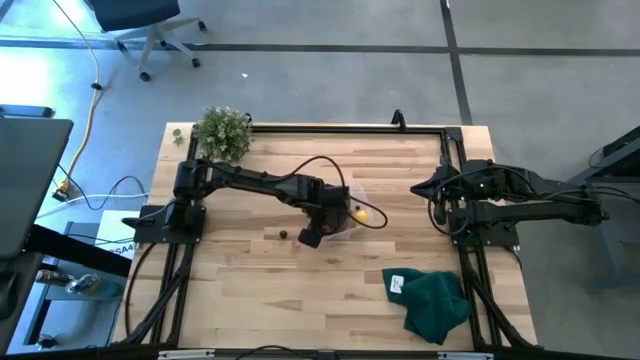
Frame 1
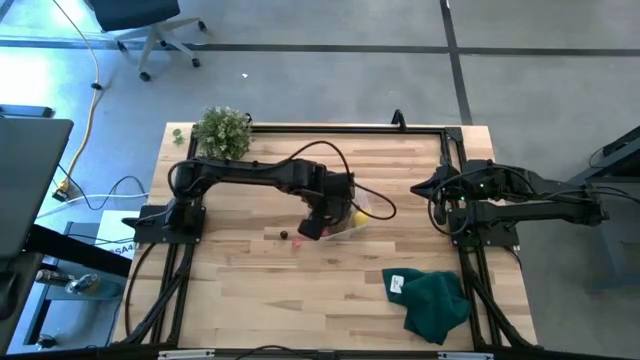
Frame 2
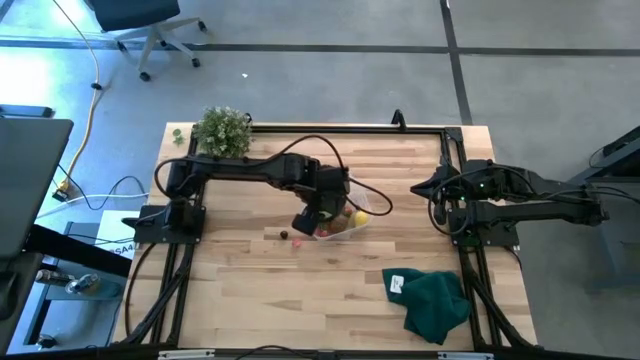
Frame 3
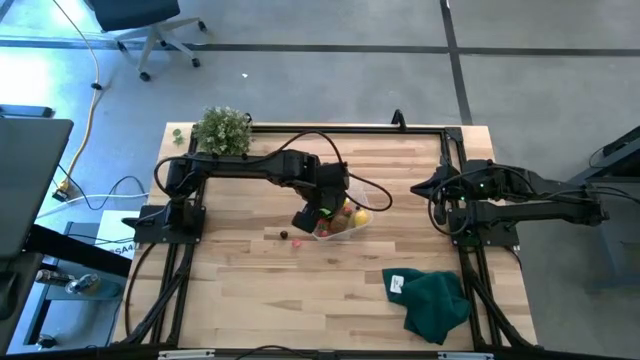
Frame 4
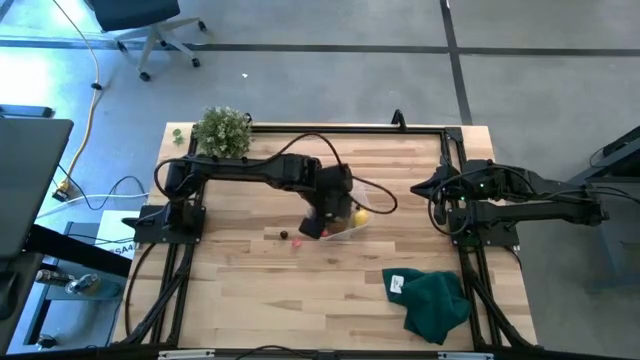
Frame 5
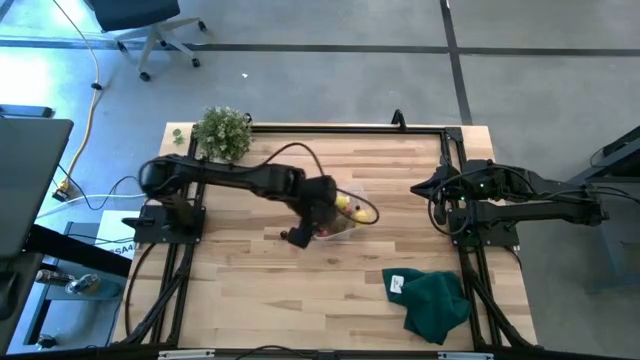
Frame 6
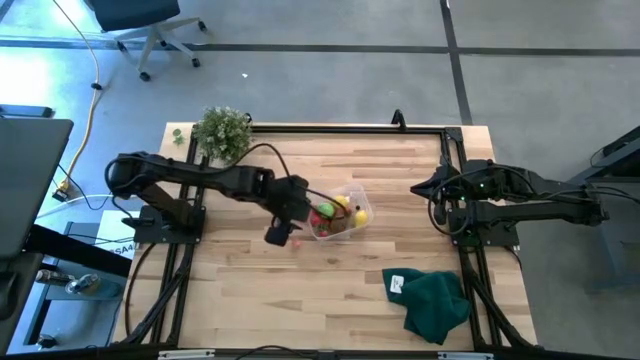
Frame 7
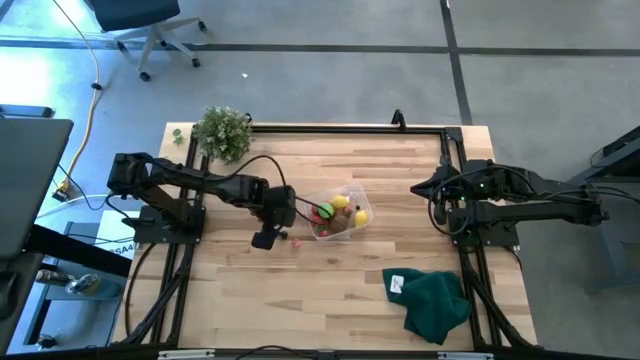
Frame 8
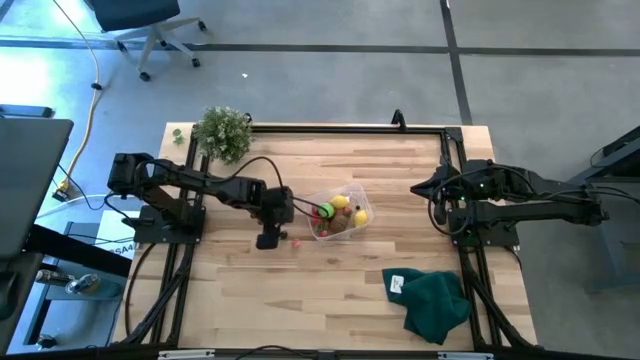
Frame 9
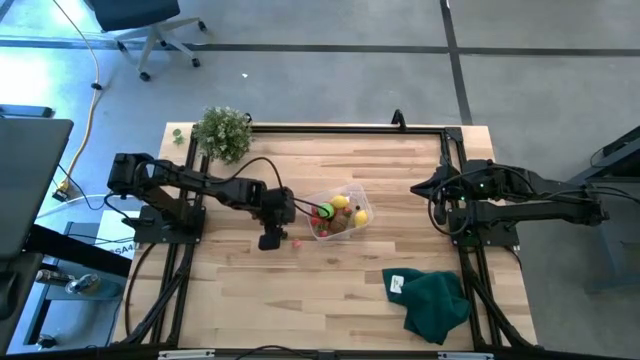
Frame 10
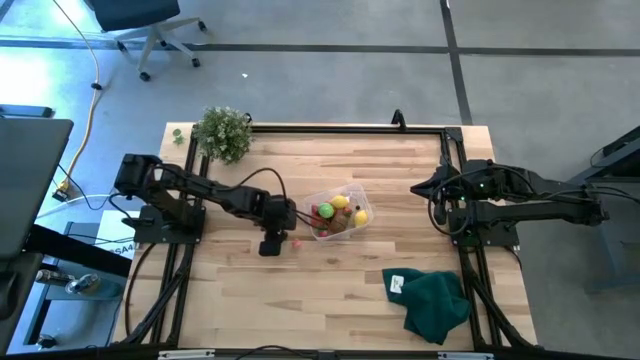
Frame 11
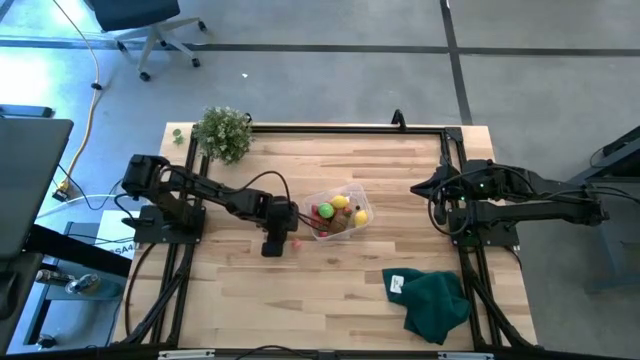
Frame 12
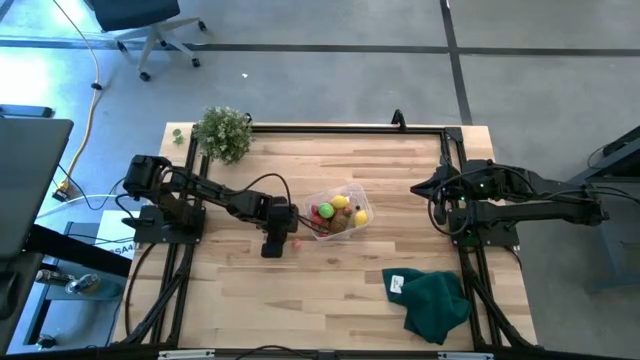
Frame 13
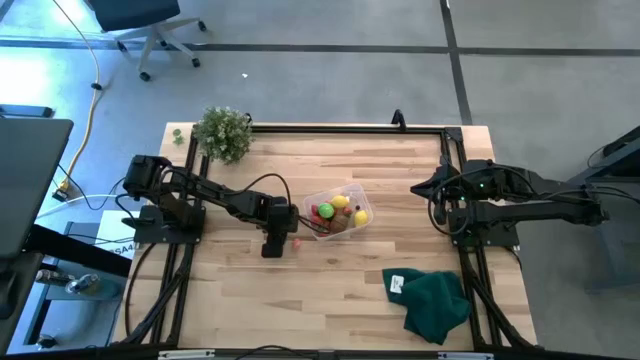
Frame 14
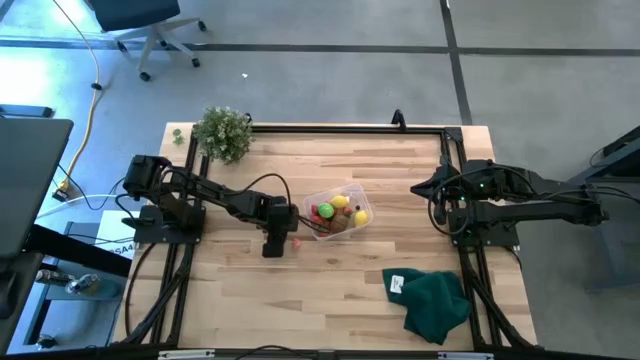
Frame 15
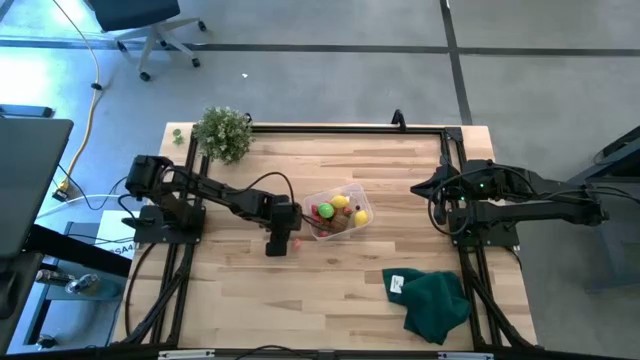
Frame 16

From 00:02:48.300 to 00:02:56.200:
Task: Pick and placing Produce into tupperware
Put the black cherry into the transparent bin

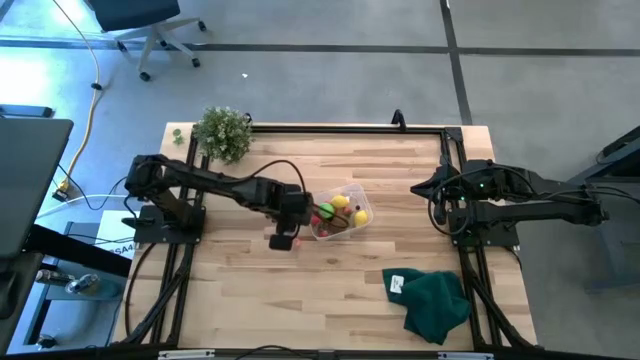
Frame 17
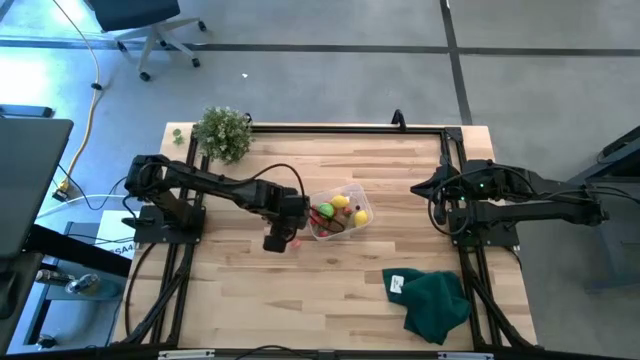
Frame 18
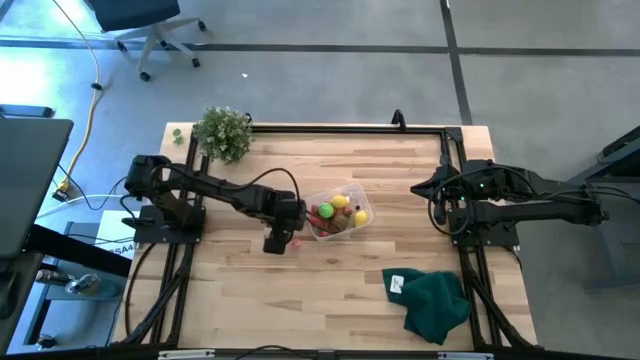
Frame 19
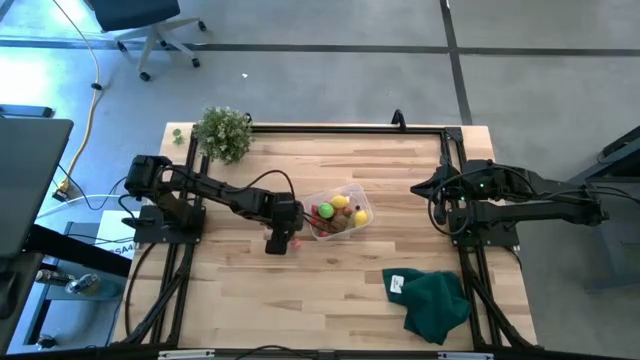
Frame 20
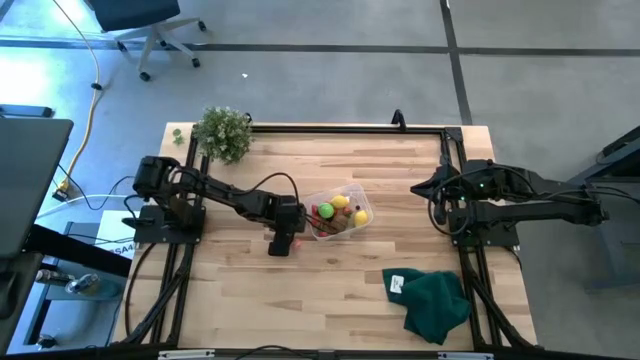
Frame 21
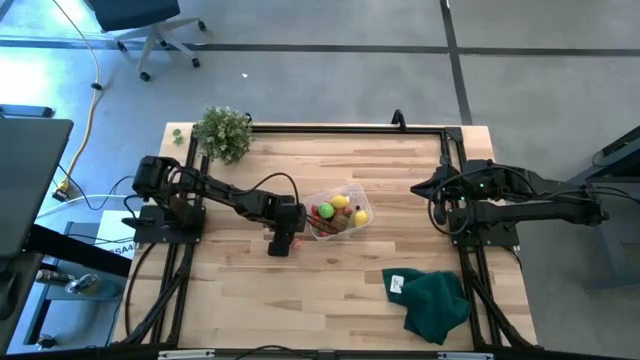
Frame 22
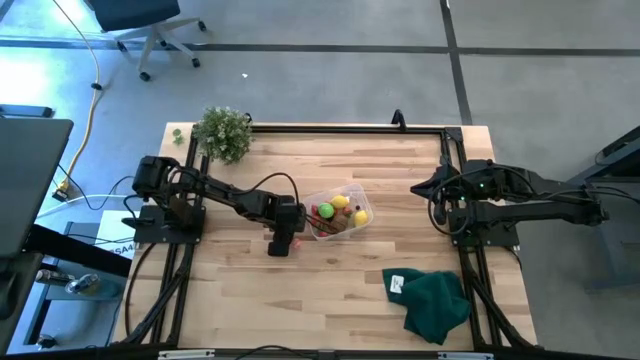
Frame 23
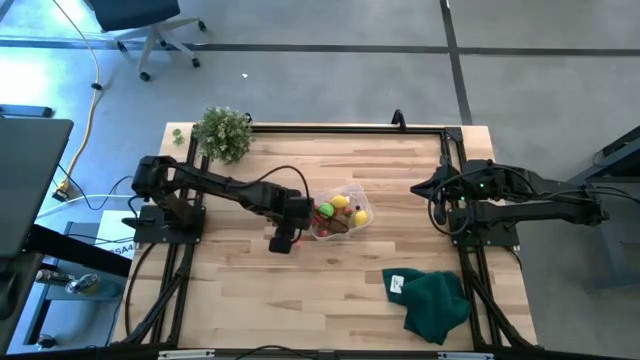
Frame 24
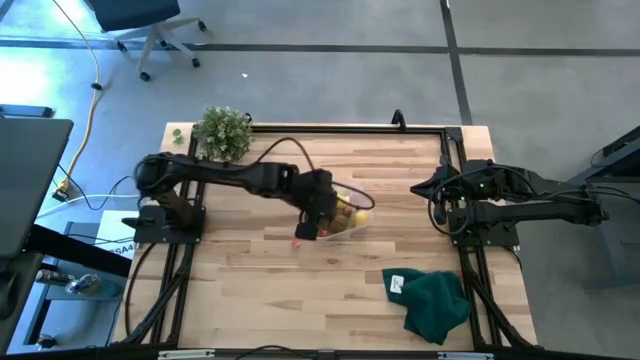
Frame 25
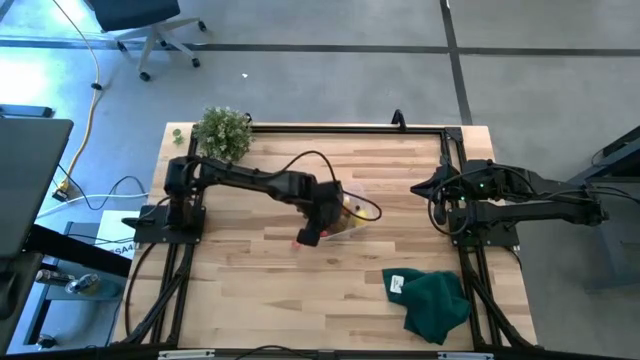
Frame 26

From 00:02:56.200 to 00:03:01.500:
Put the black cherry into the transparent bin

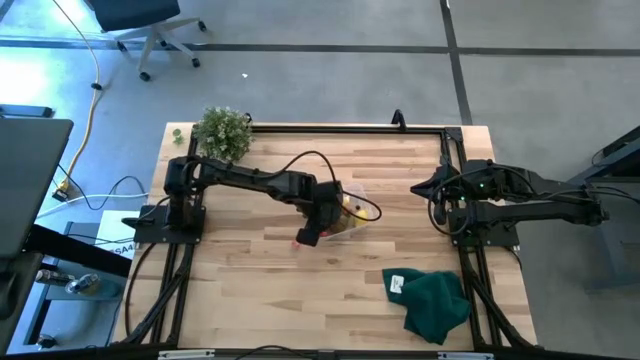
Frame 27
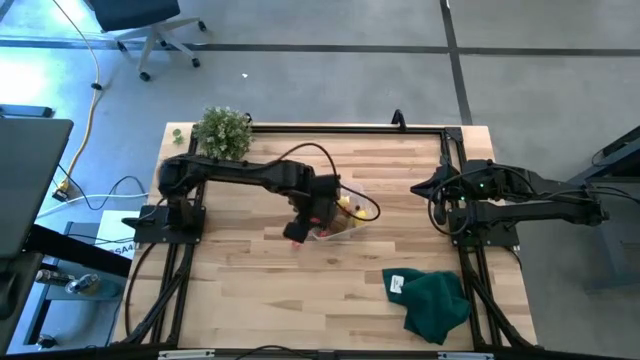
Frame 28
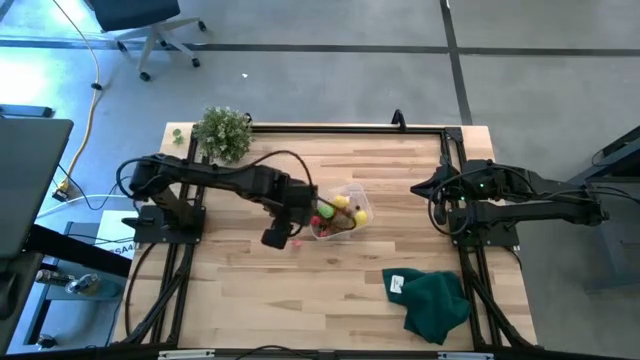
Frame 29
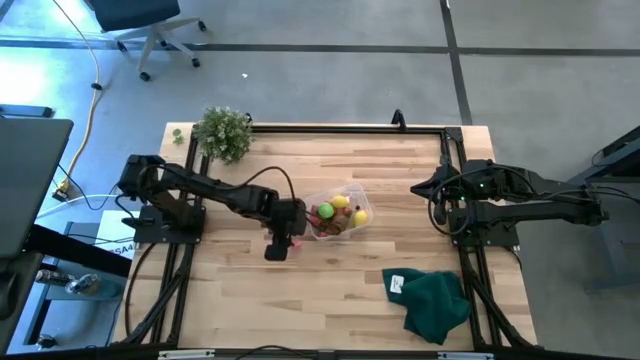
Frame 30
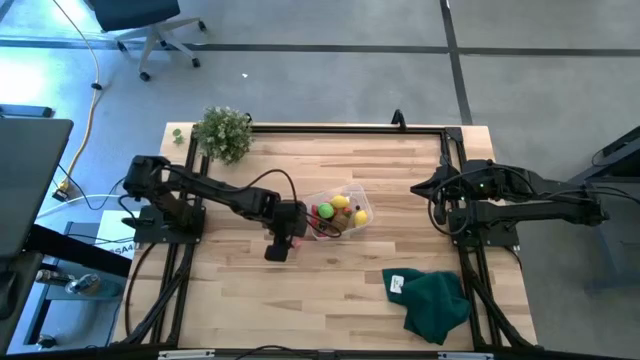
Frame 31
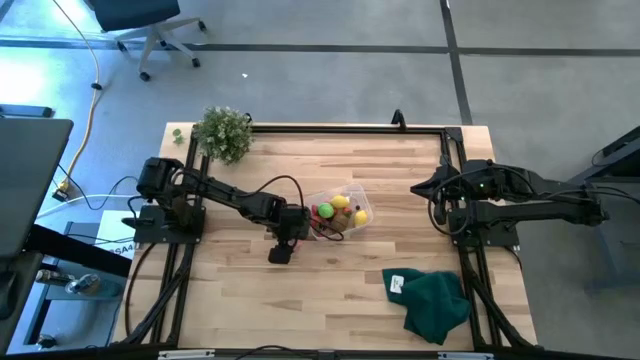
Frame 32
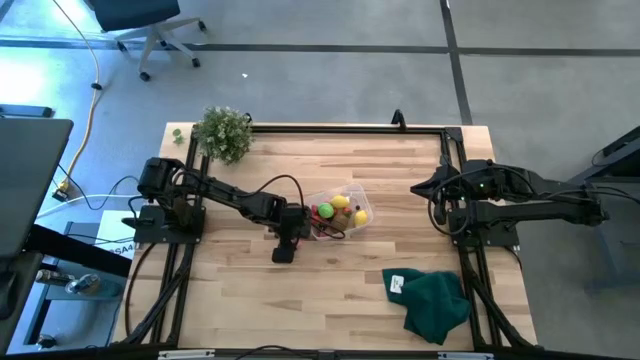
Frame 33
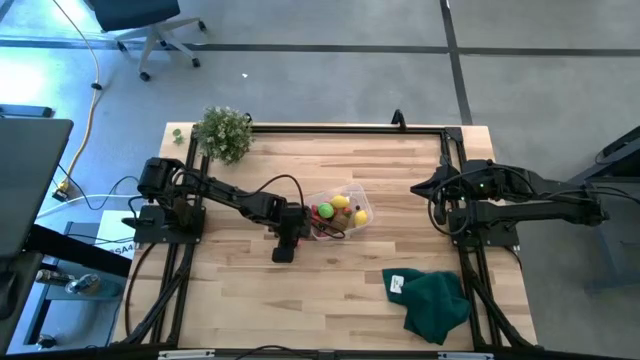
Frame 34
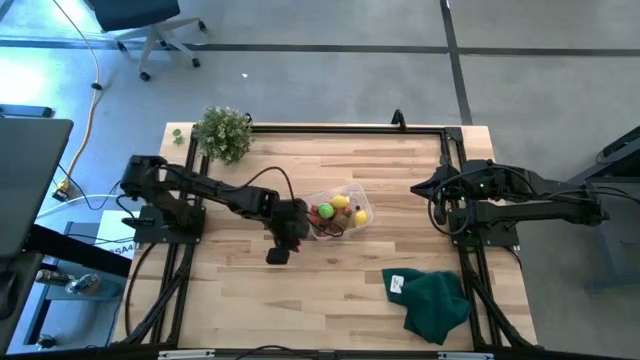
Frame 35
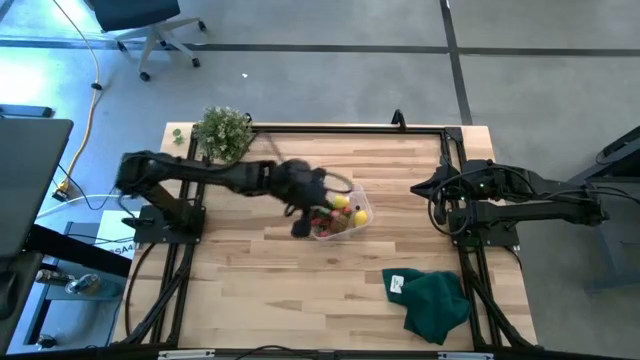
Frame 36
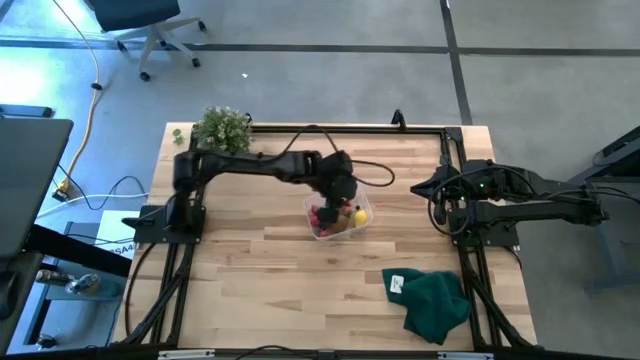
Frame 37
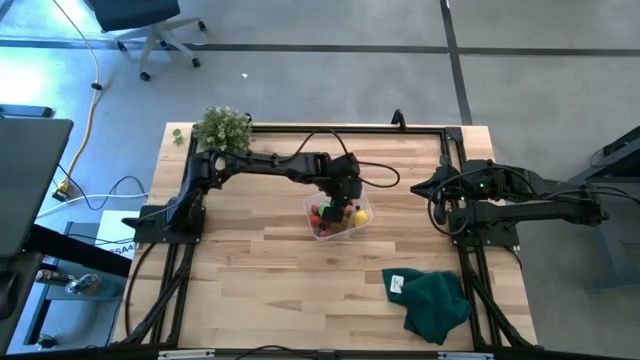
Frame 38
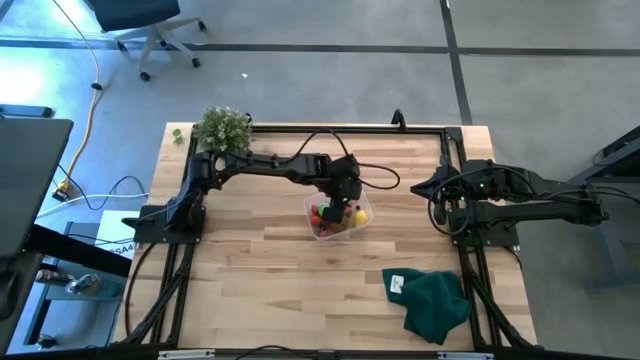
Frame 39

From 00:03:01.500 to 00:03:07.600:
Put the pink peach into the transparent bin

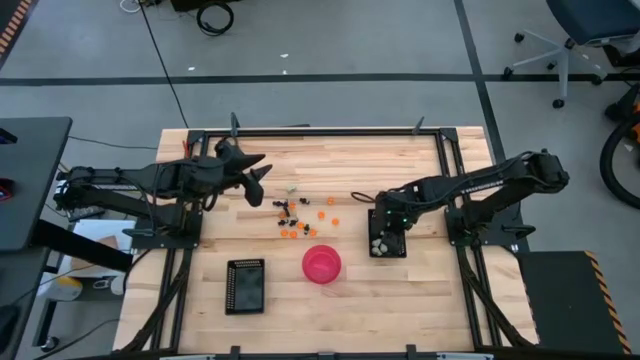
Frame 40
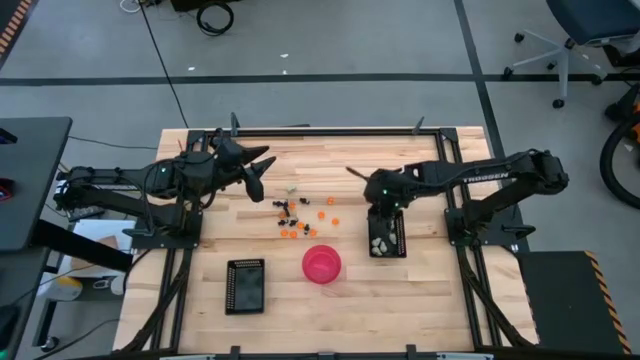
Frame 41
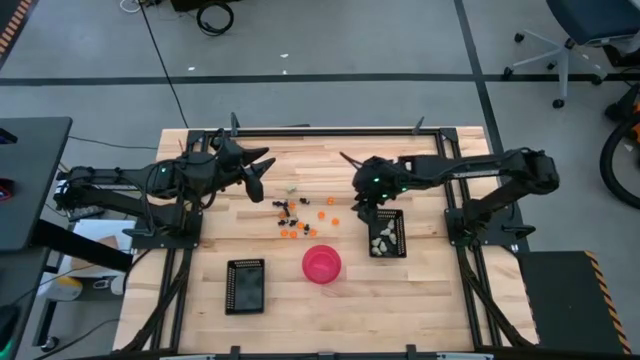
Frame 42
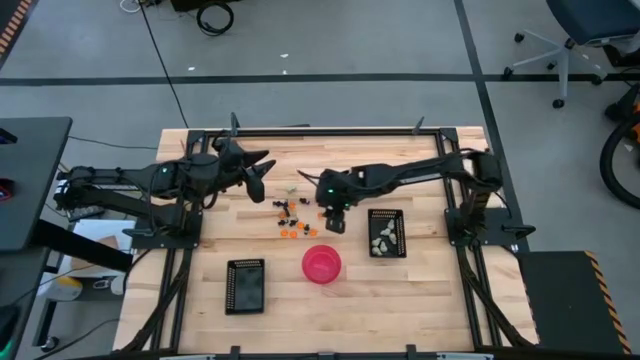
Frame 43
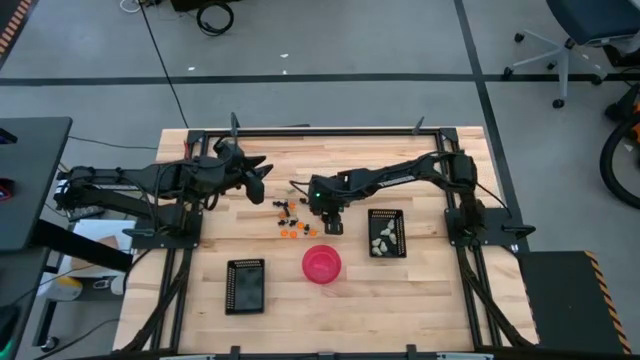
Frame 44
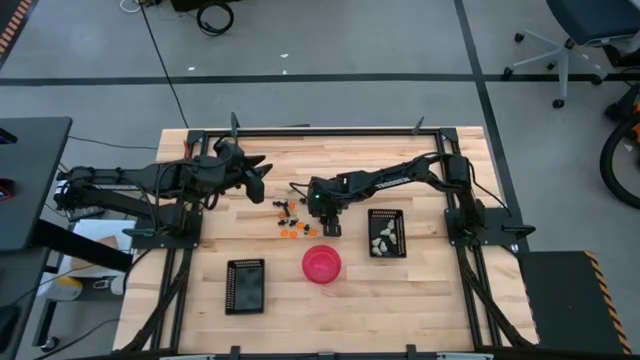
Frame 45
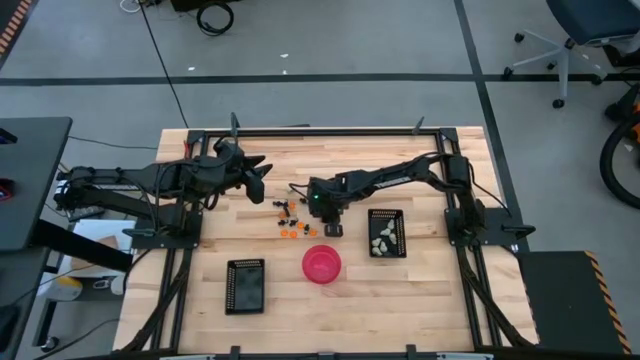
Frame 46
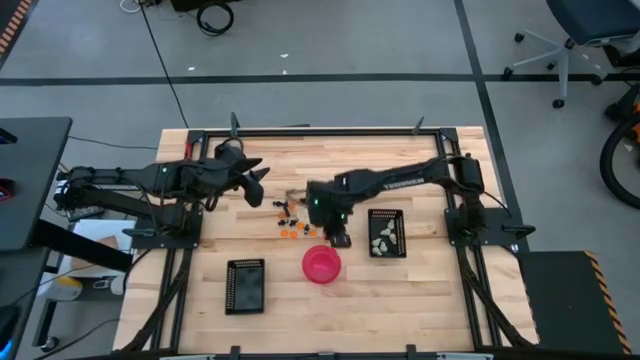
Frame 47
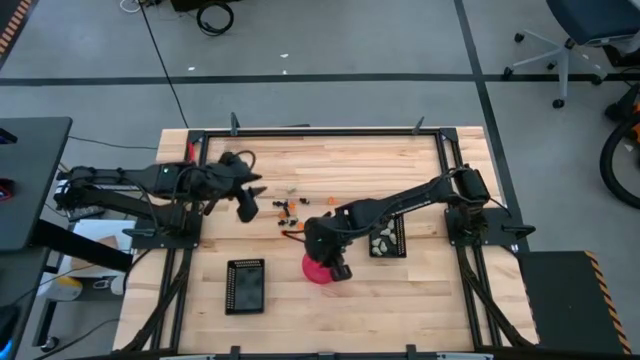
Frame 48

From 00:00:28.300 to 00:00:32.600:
Task: Sort Halloween decoration
Put the orange pumpkin toy into the pink bowl
